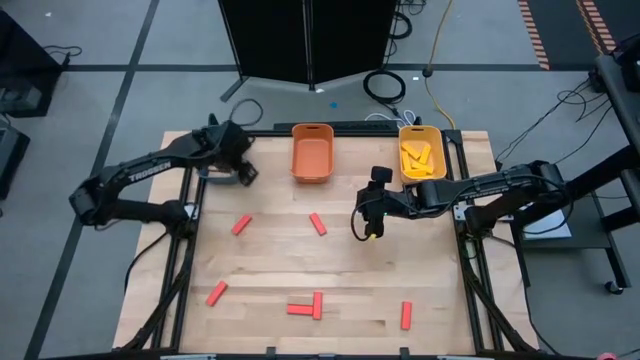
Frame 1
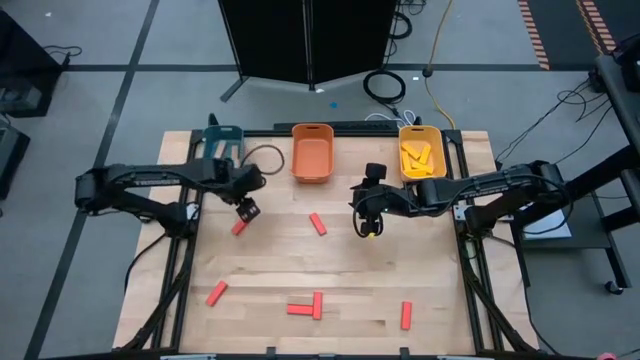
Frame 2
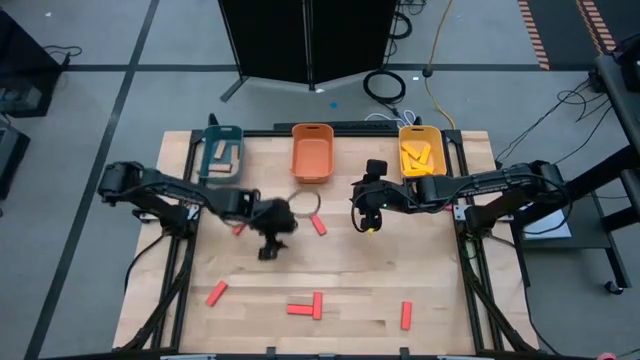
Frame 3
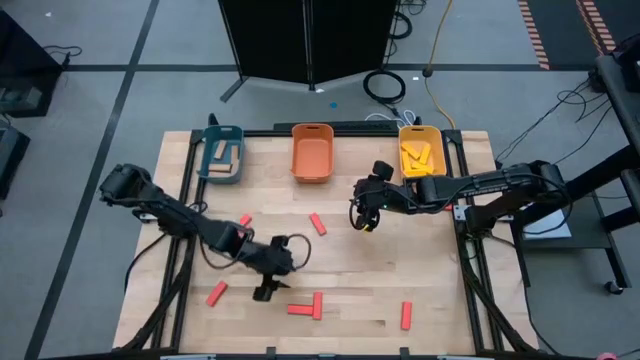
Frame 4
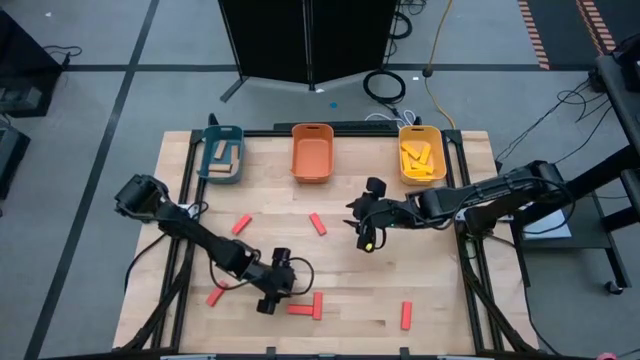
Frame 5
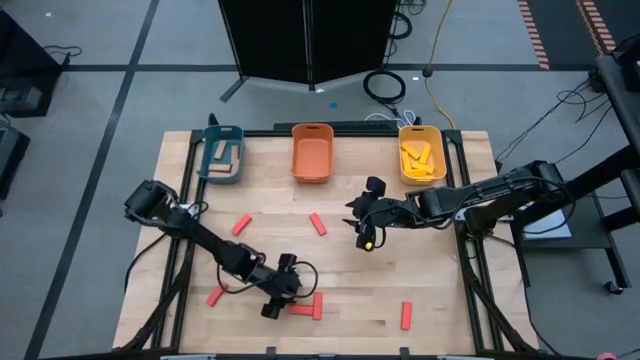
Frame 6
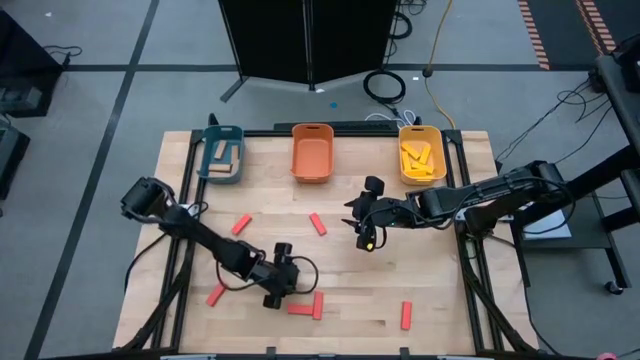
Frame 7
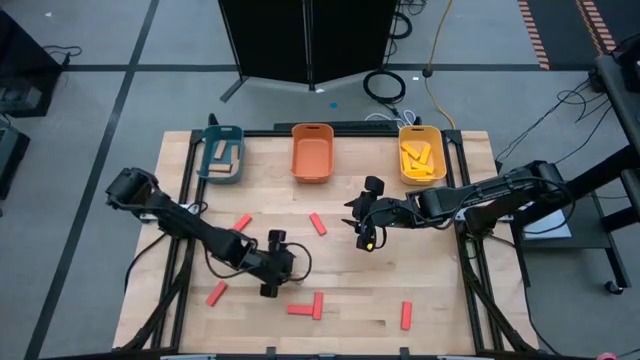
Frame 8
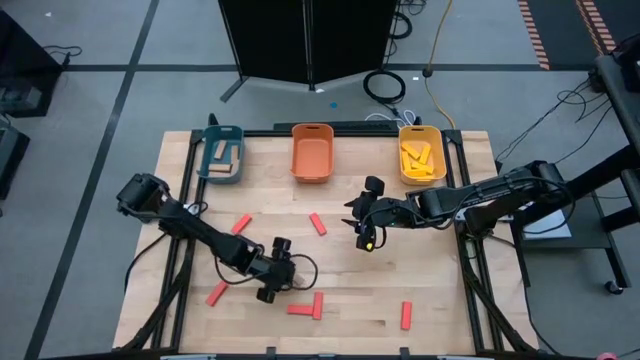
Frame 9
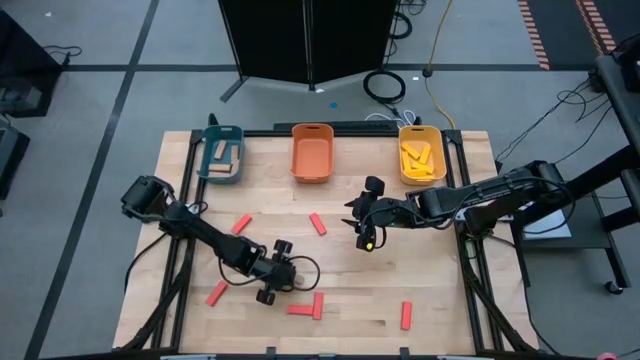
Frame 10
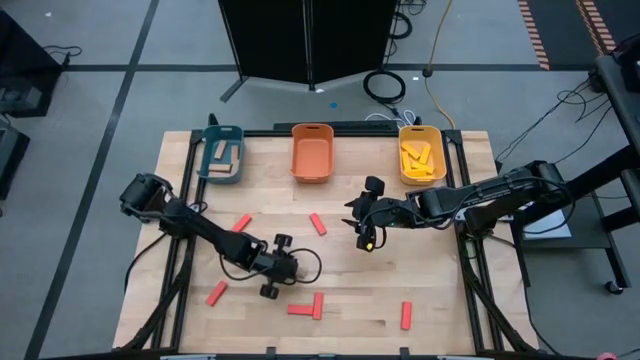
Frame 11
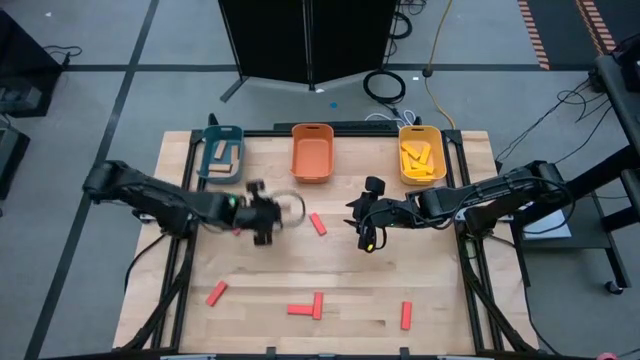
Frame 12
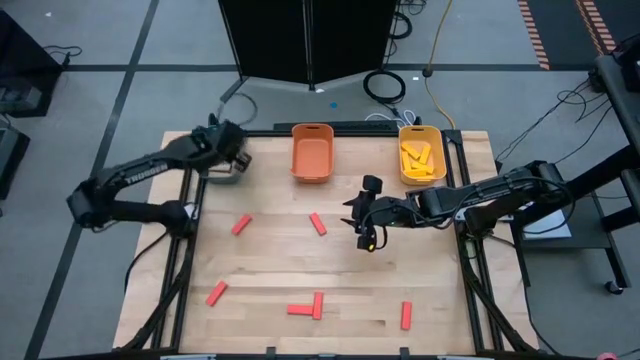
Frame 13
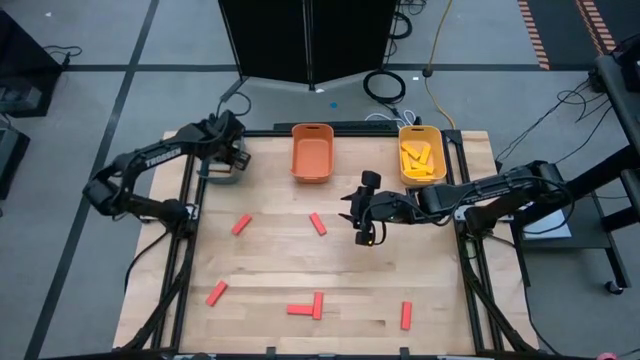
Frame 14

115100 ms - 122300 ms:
Task: Sort blocks
Put the brown block into the blue bin

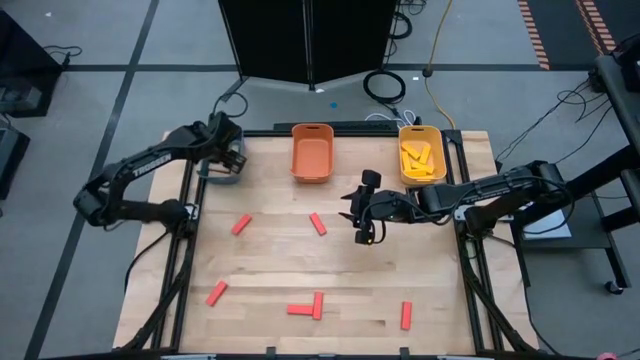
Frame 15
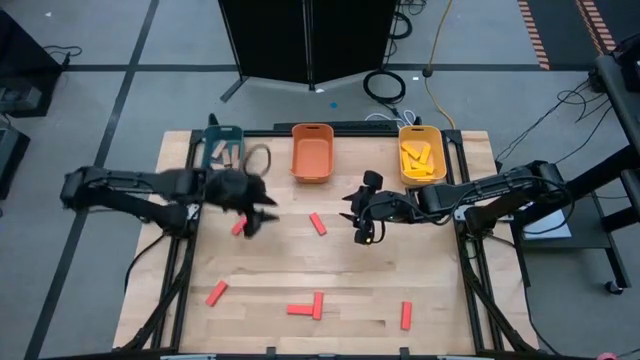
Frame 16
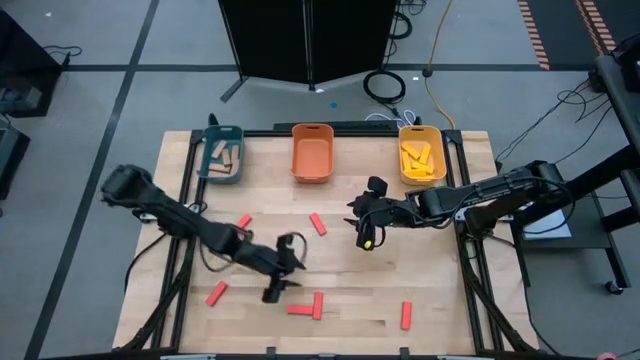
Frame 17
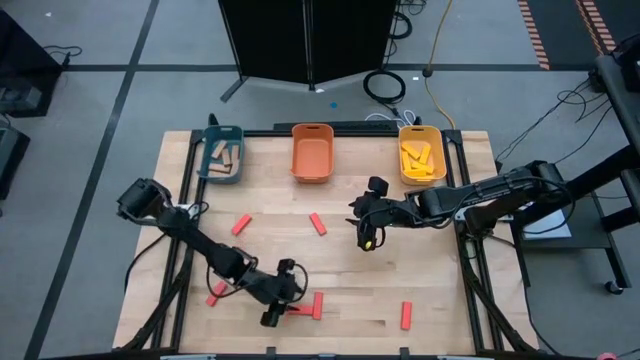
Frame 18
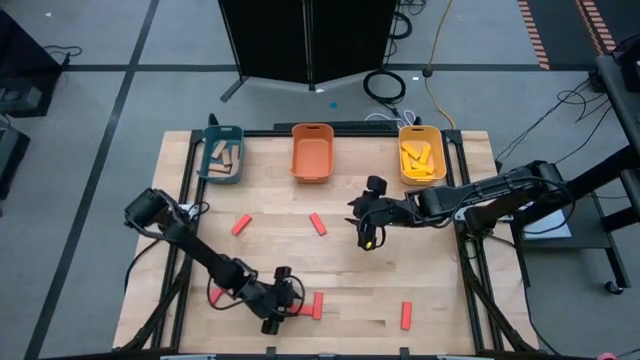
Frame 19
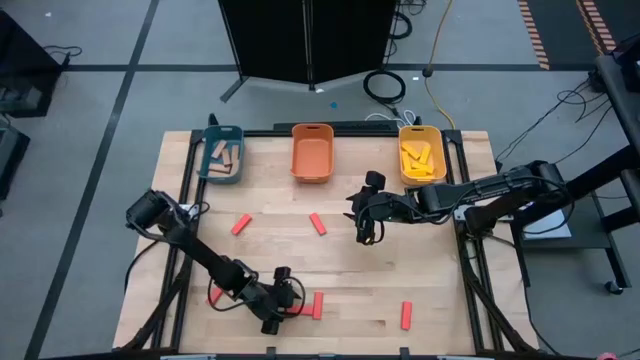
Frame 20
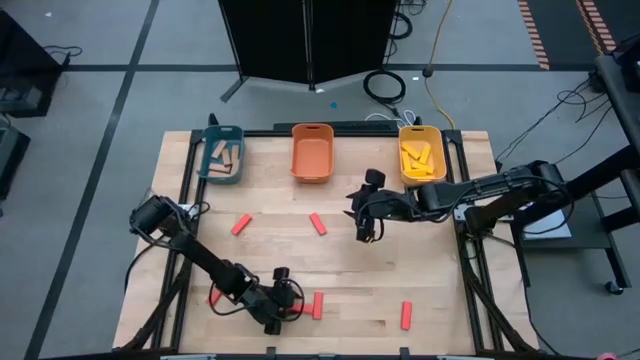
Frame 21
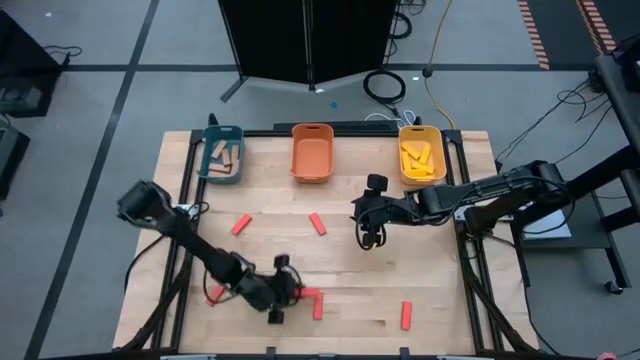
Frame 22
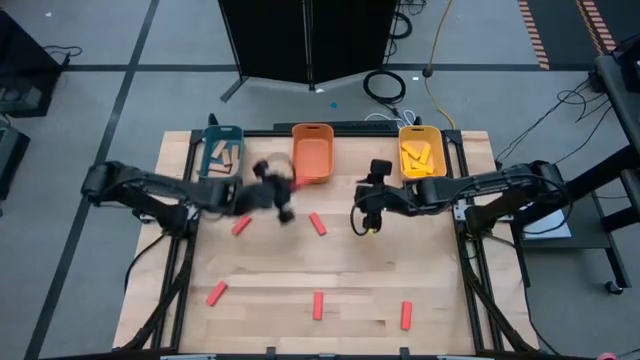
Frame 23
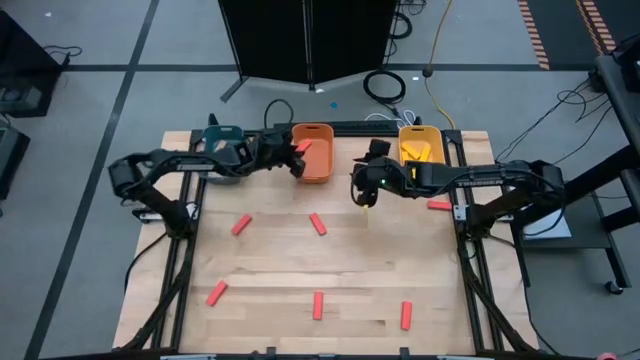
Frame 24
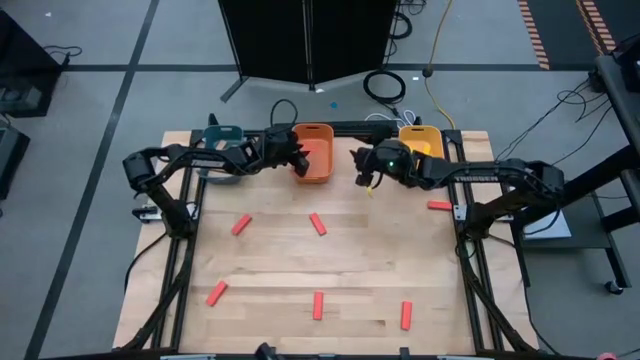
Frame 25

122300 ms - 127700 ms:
Put the red block into the orange bin

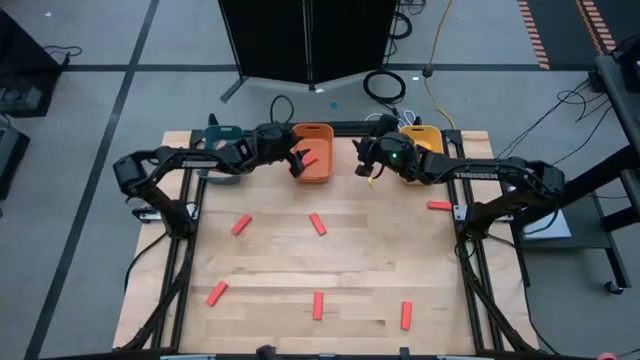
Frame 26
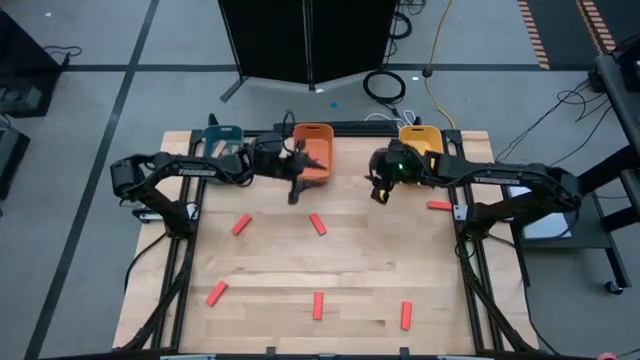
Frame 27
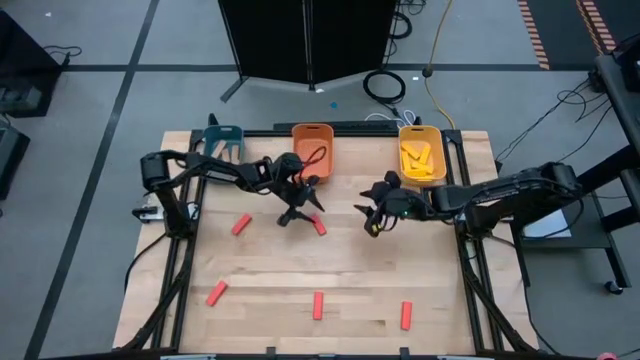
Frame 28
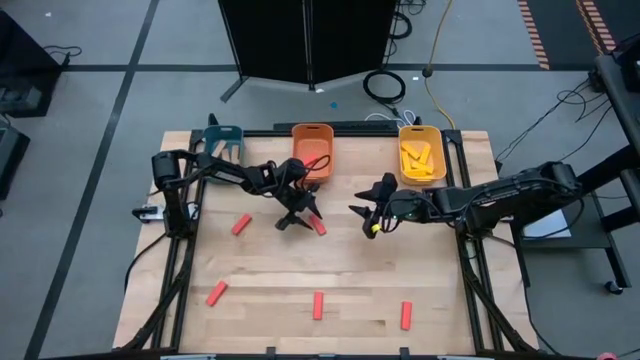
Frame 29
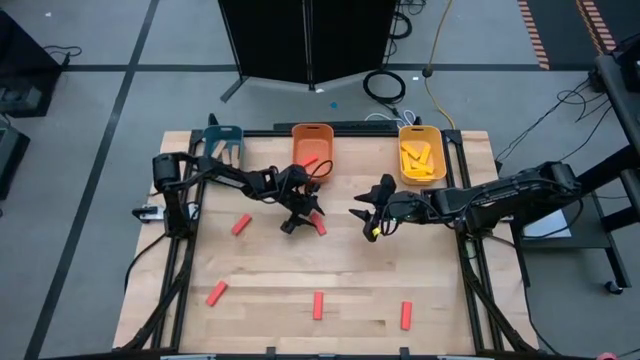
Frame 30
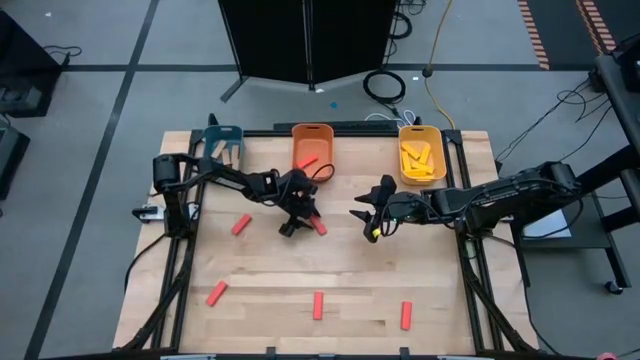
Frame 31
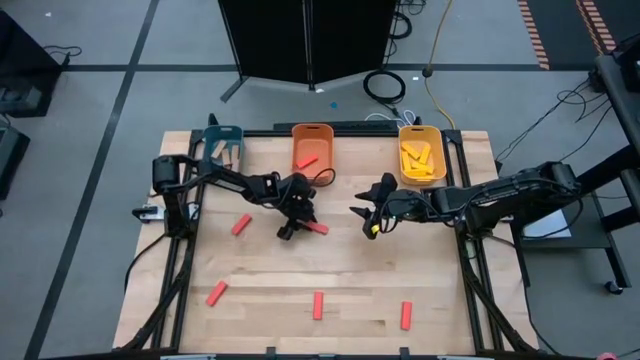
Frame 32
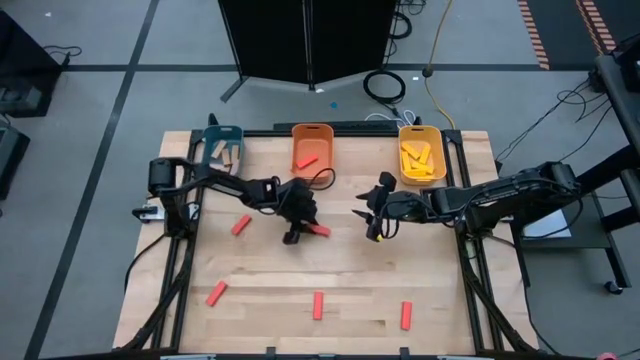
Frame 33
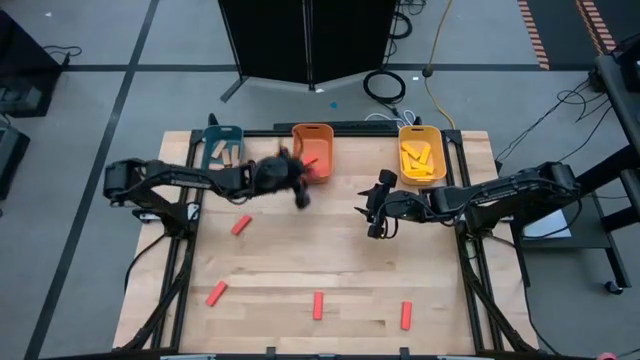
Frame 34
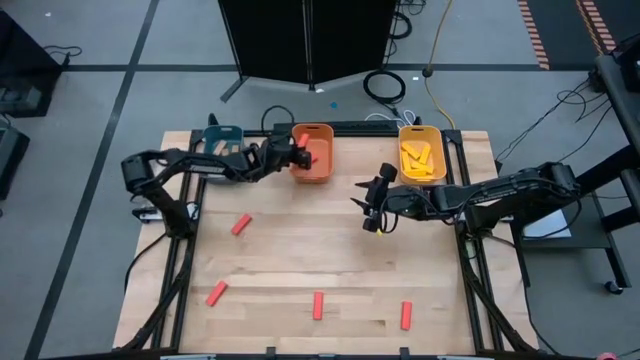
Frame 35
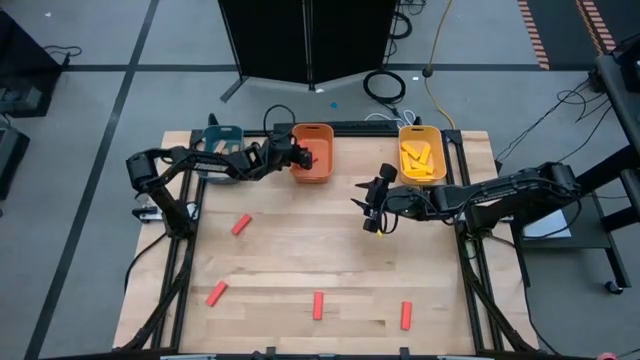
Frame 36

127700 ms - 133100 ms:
Put the red block into the orange bin

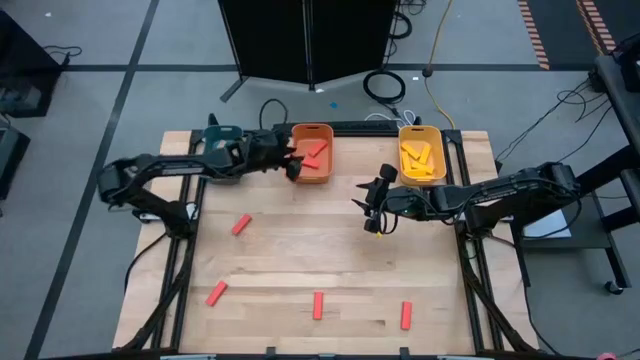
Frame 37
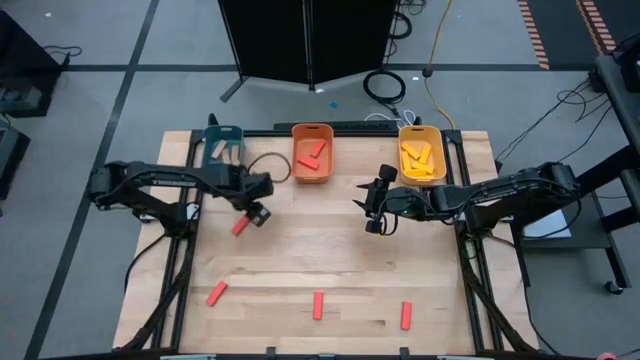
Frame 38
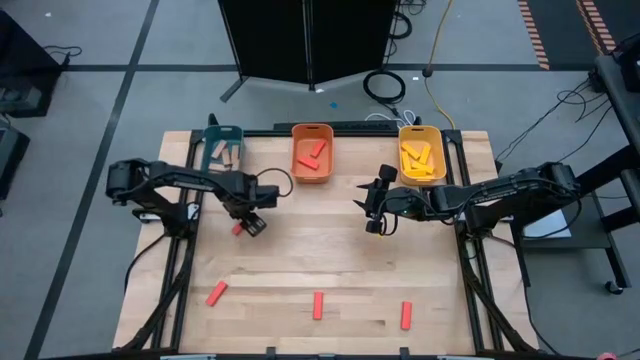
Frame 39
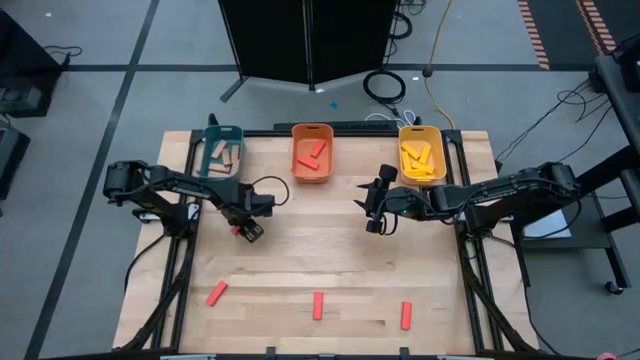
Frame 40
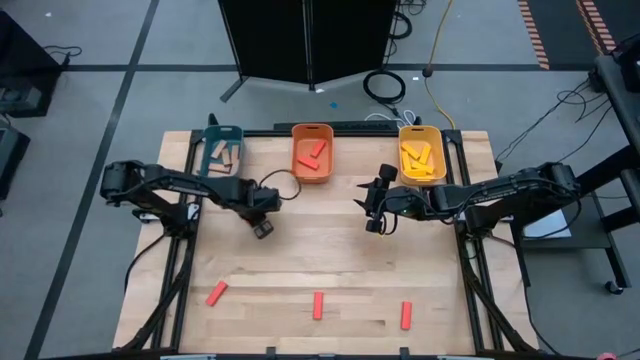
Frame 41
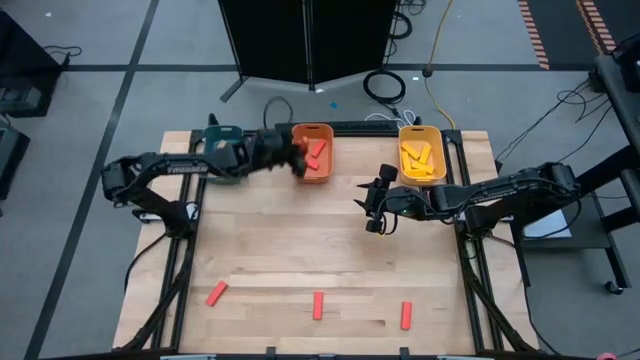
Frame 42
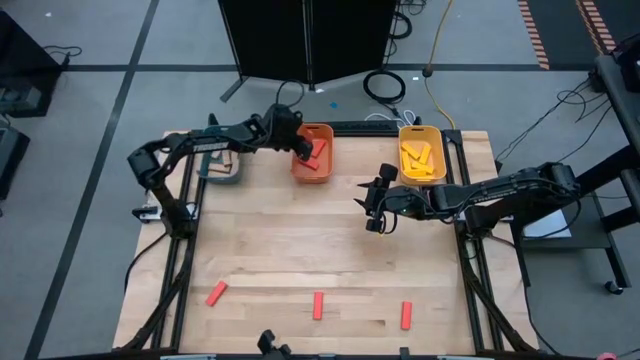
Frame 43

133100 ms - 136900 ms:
Put the red block into the orange bin
